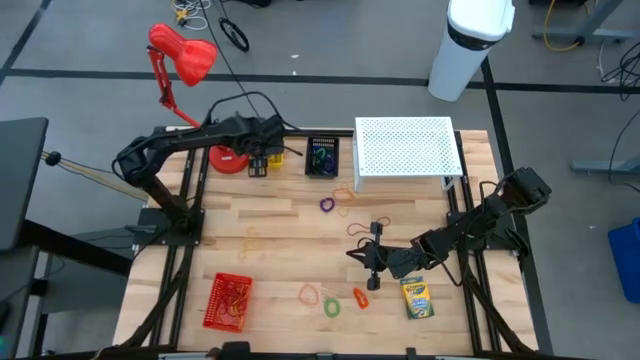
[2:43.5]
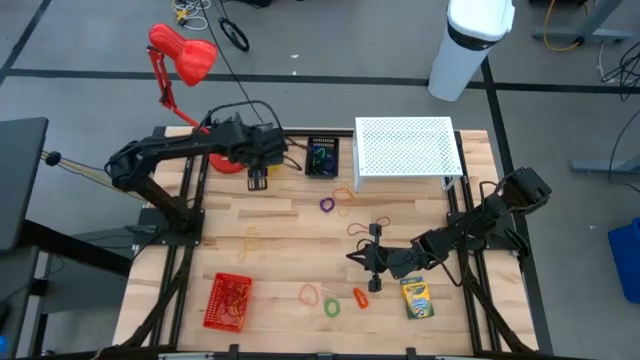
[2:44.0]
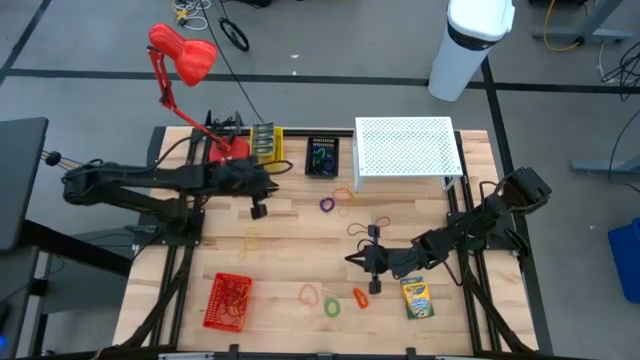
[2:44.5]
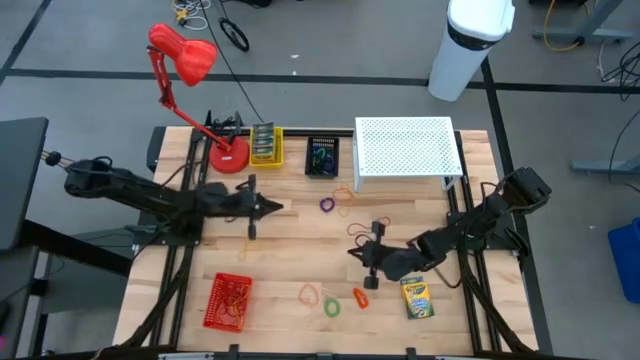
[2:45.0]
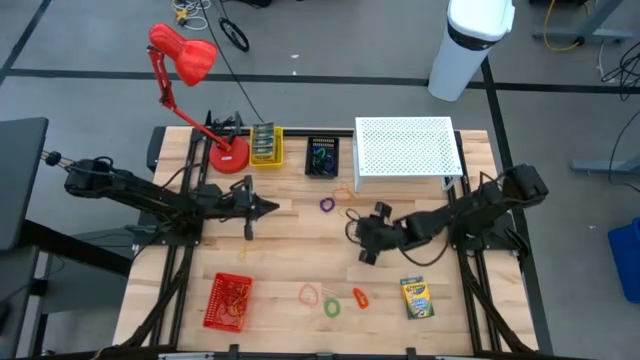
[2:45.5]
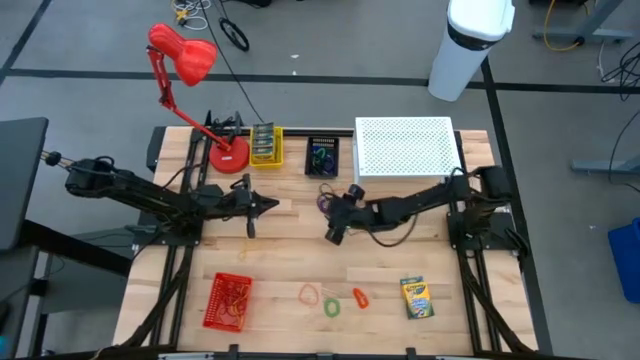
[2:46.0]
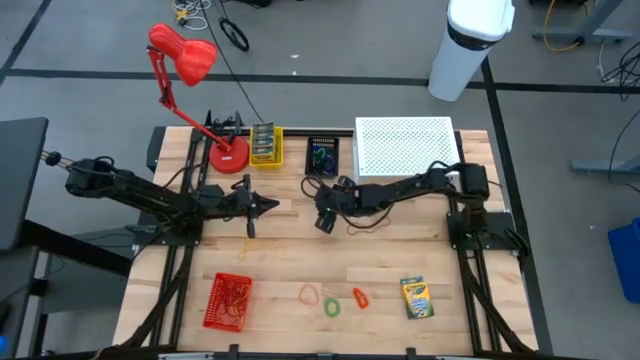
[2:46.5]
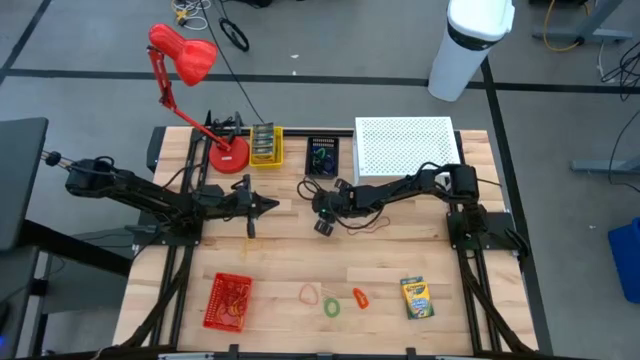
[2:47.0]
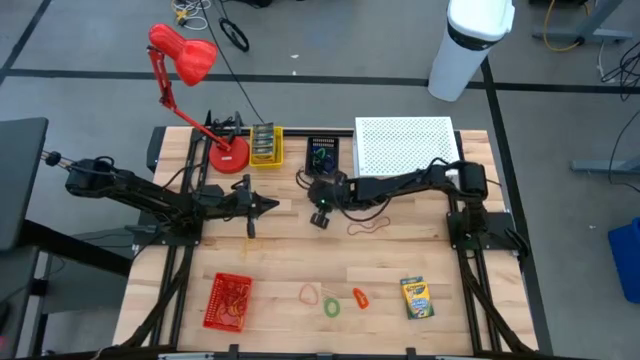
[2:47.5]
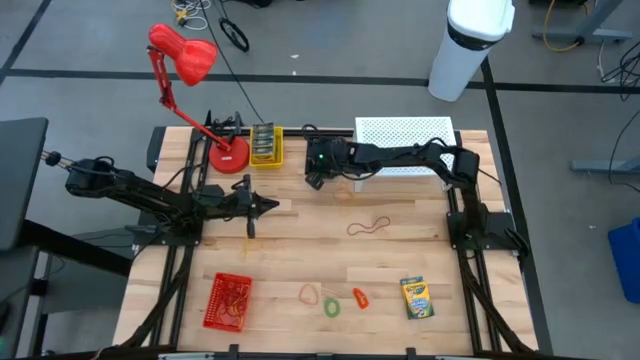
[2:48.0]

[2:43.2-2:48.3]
Task: Pick & Place Office Desk Supplies
Put the violet spiral keychain into the black bin

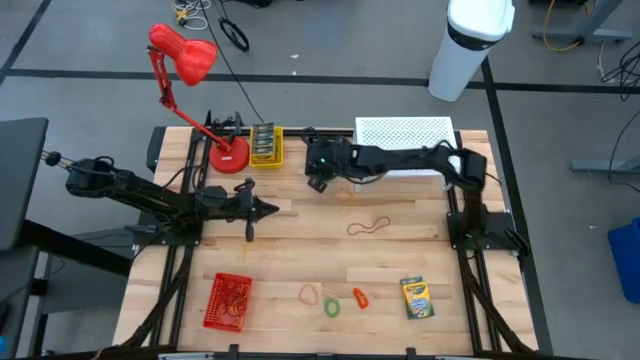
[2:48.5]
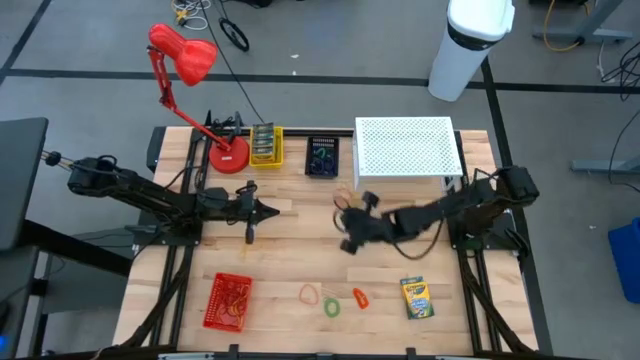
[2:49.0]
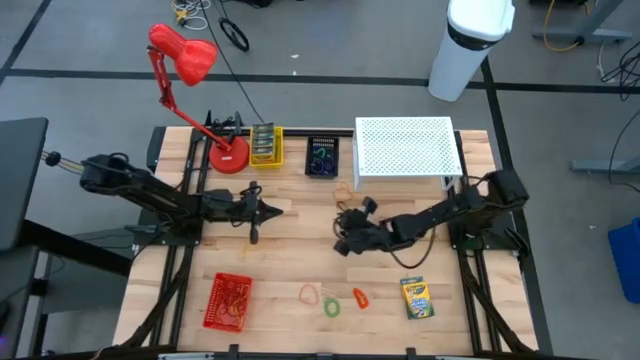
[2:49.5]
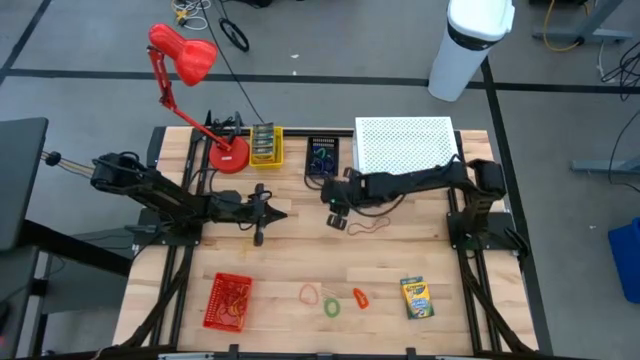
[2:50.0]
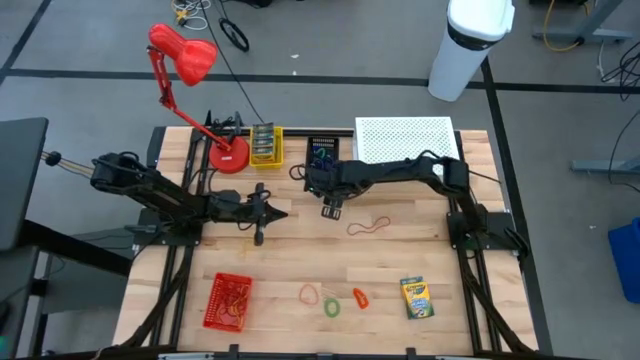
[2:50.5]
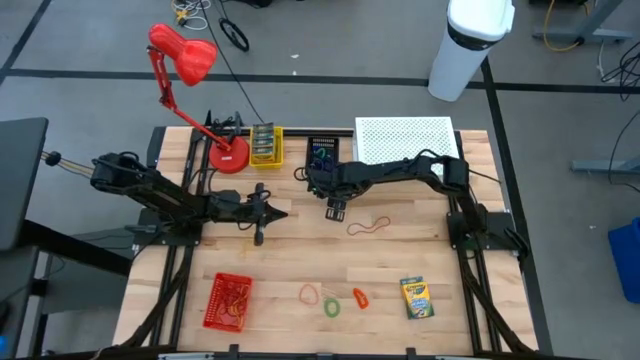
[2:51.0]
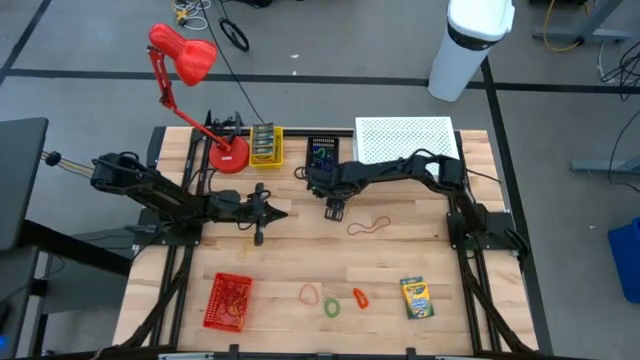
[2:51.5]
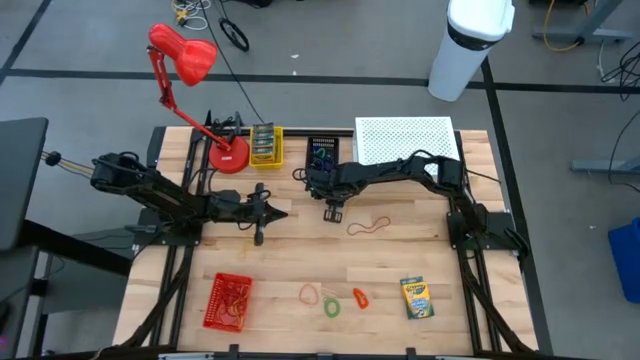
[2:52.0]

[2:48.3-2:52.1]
Put the orange rubber band into the red bin

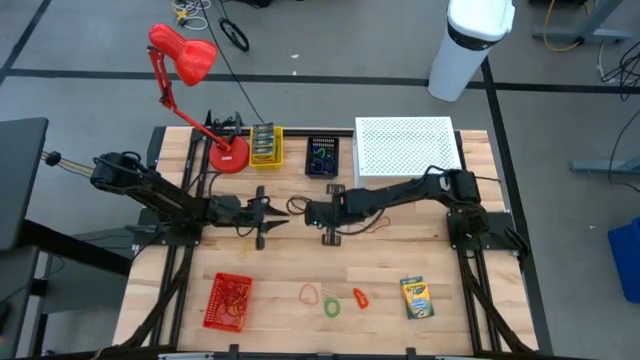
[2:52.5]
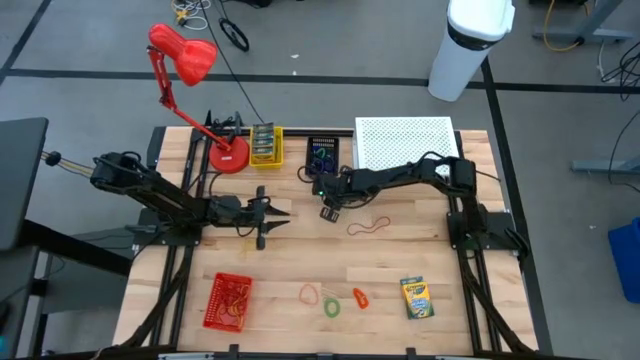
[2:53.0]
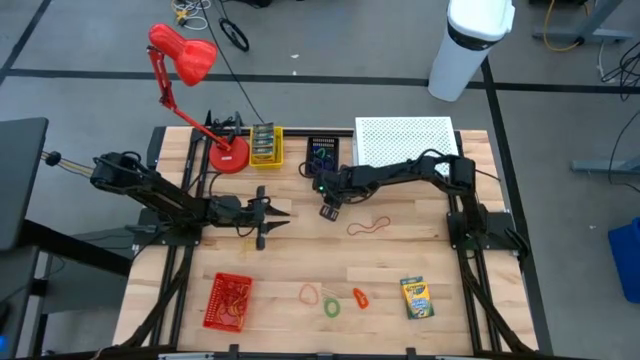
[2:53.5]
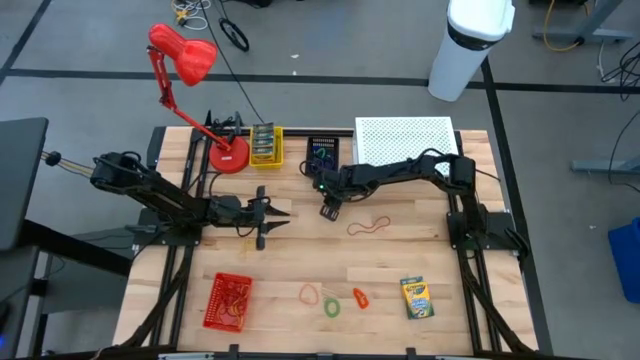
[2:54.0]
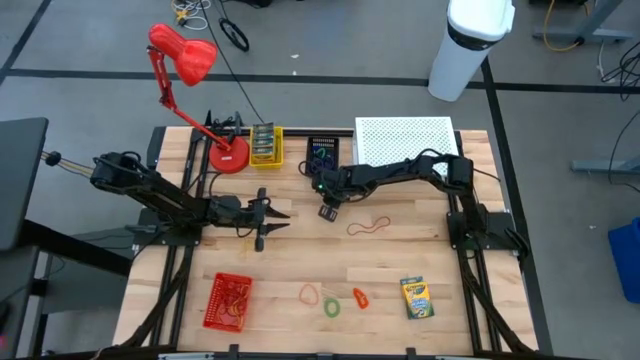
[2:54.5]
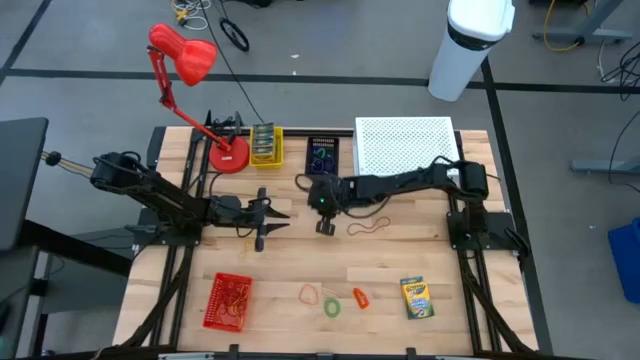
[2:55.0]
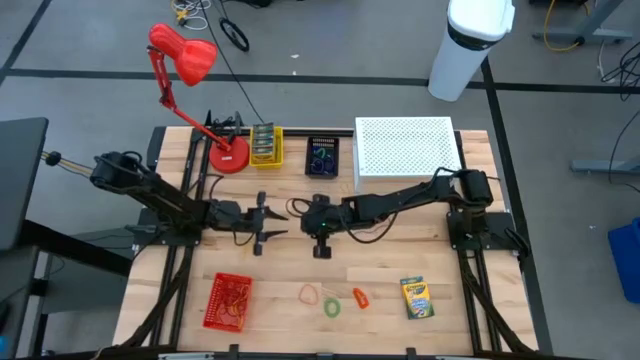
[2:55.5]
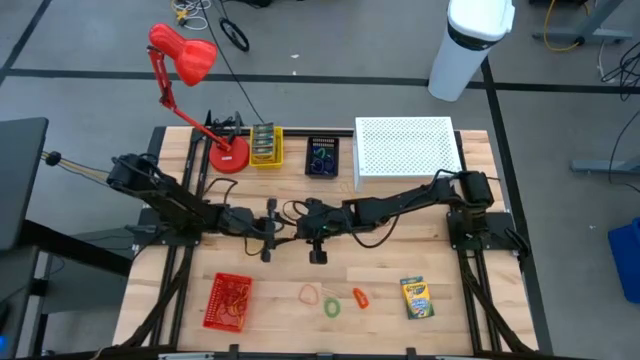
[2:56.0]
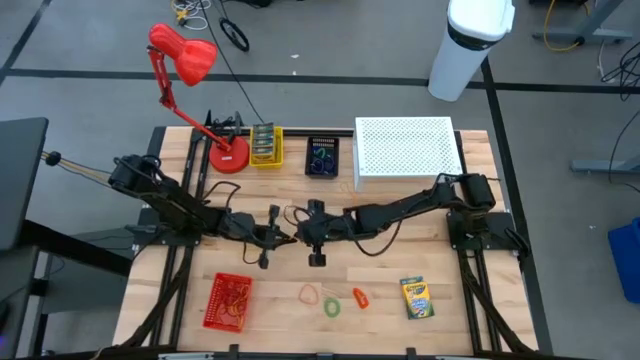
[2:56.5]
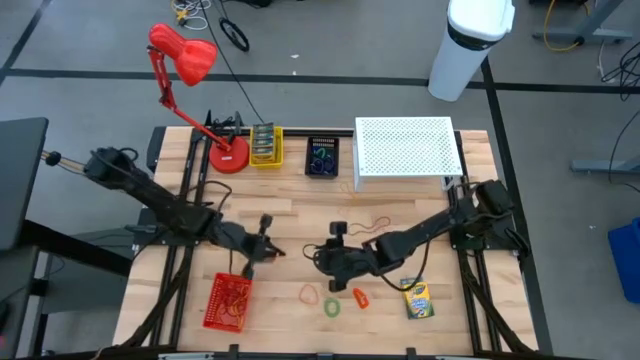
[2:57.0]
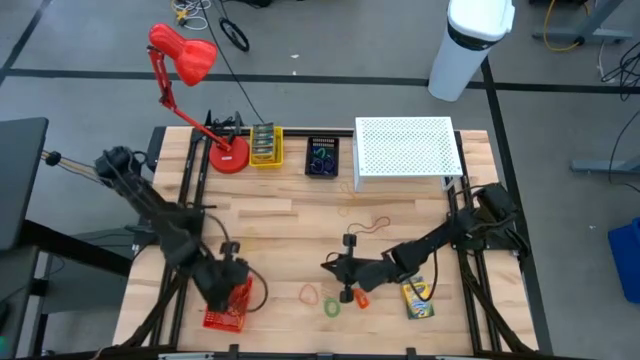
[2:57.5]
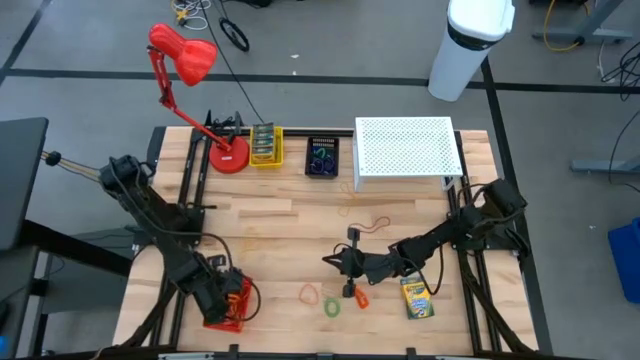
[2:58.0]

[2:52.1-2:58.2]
Put the orange rubber band into the red bin

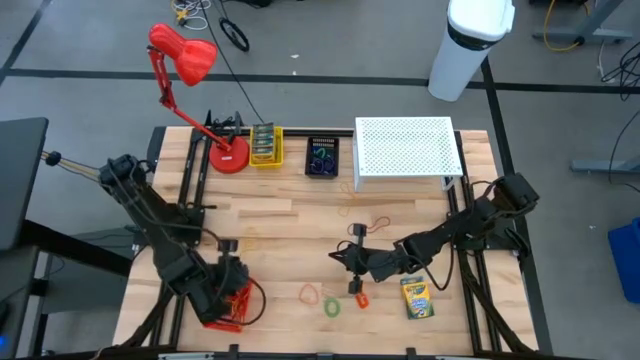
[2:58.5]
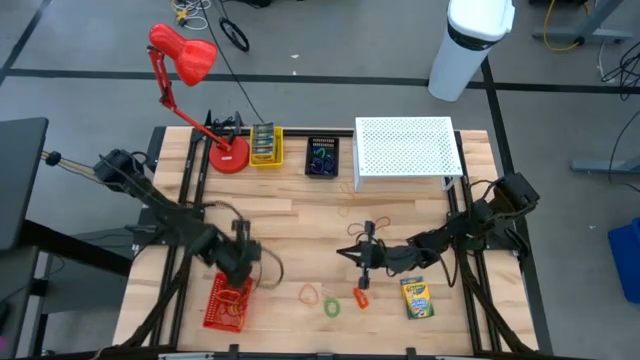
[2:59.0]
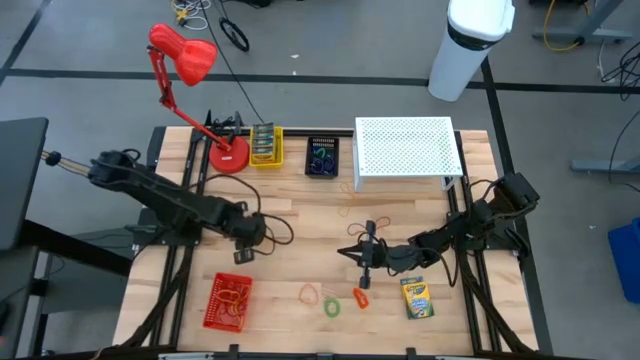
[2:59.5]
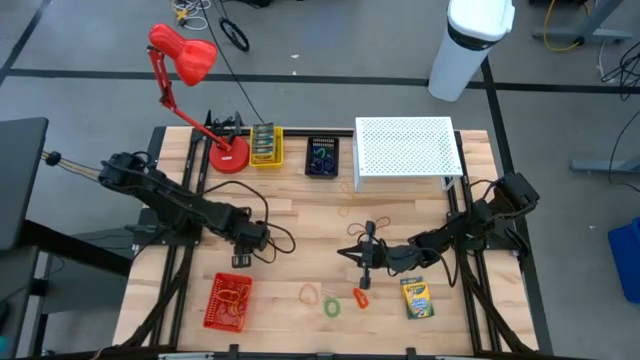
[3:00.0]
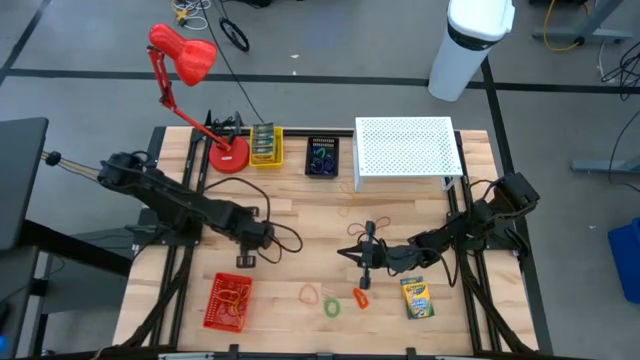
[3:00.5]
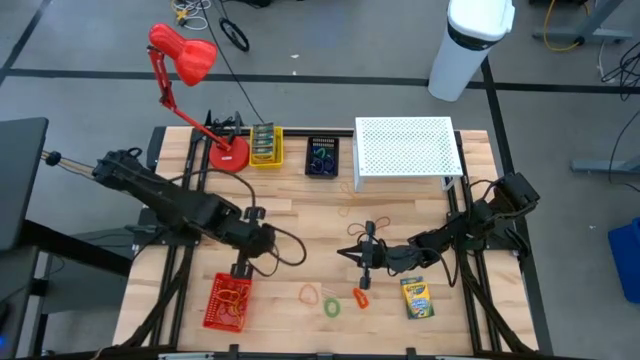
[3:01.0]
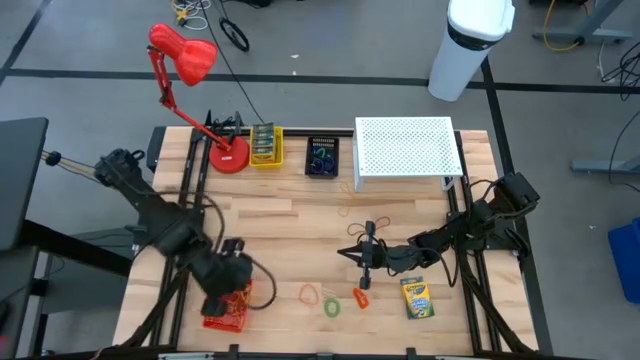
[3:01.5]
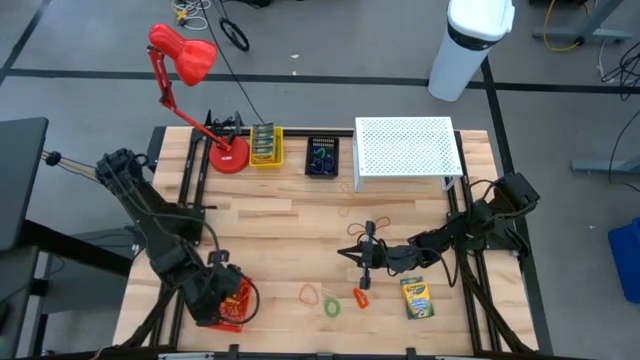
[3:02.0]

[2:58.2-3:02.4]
Put the yellow rubber band into the red bin

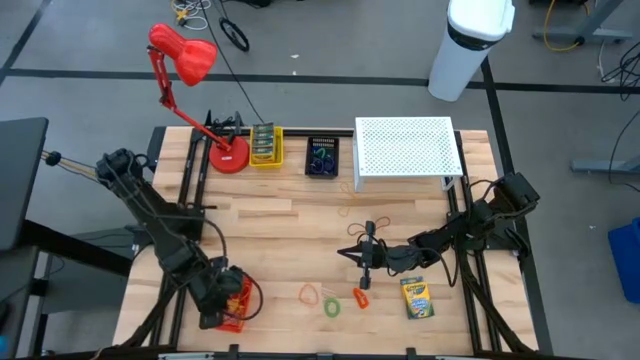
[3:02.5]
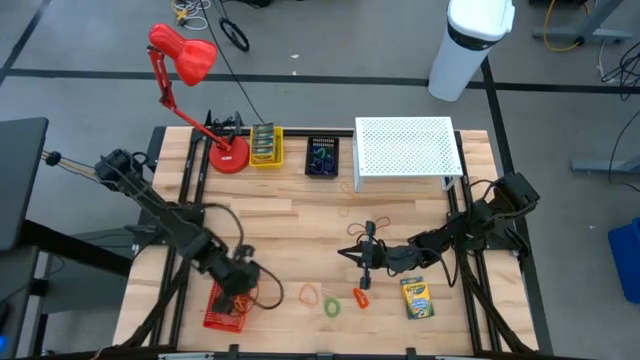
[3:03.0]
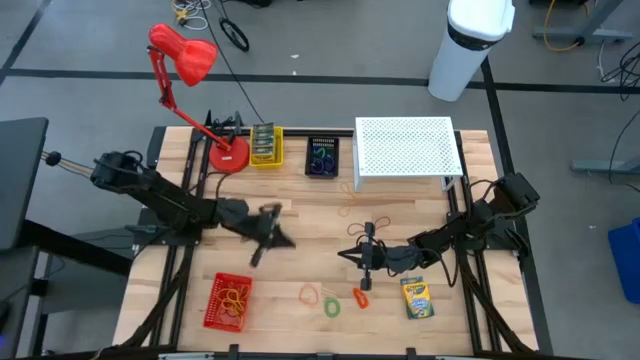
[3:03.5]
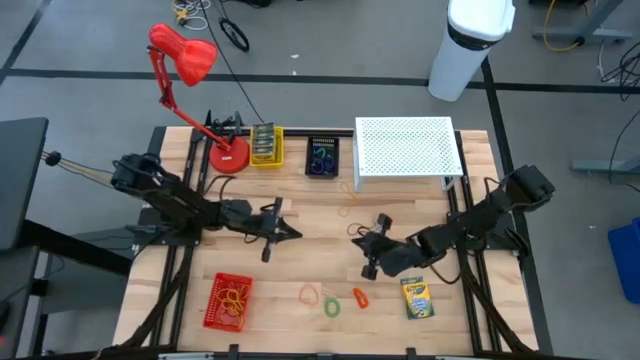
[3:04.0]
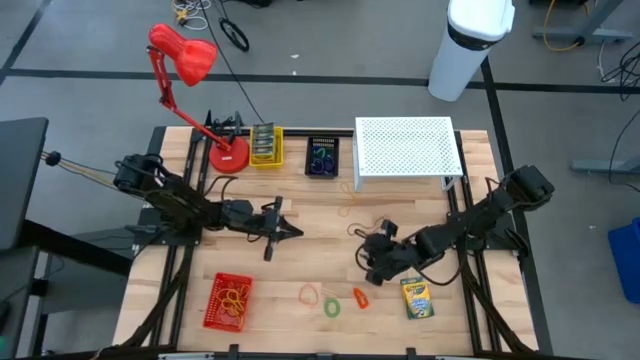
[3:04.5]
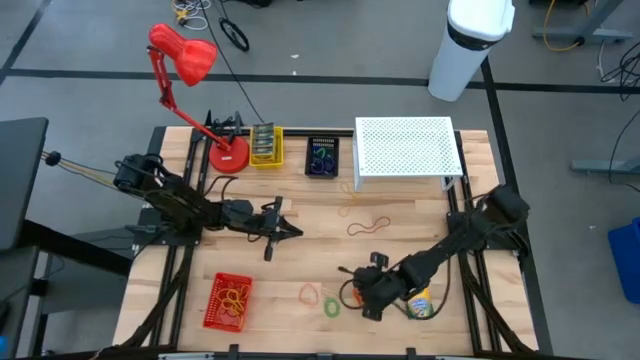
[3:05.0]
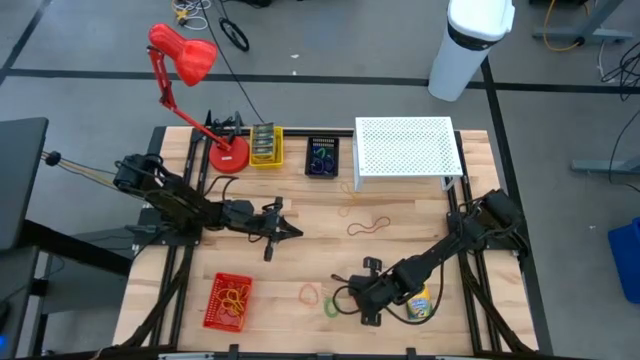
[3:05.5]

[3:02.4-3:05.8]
Put the orange spiral keychain into the black bin
